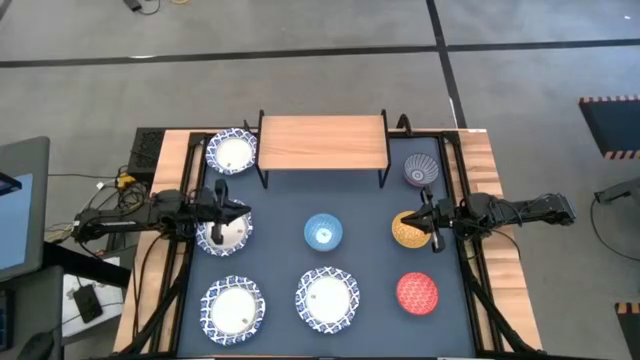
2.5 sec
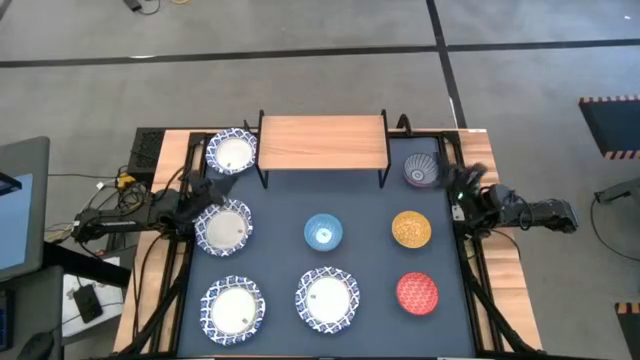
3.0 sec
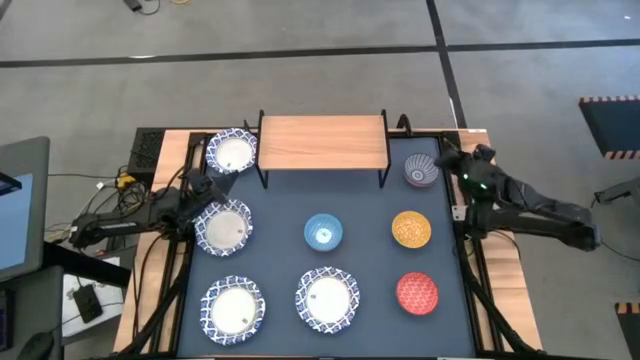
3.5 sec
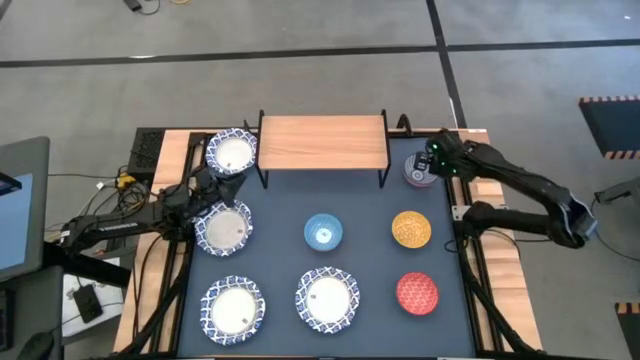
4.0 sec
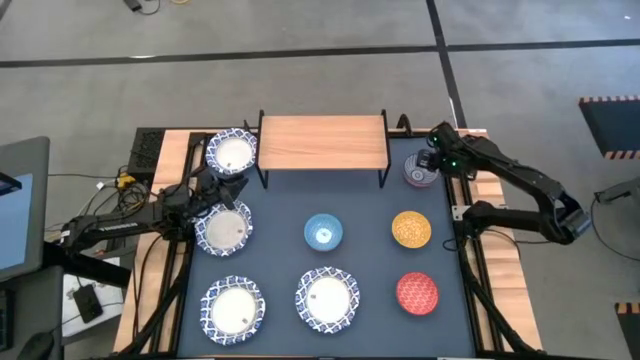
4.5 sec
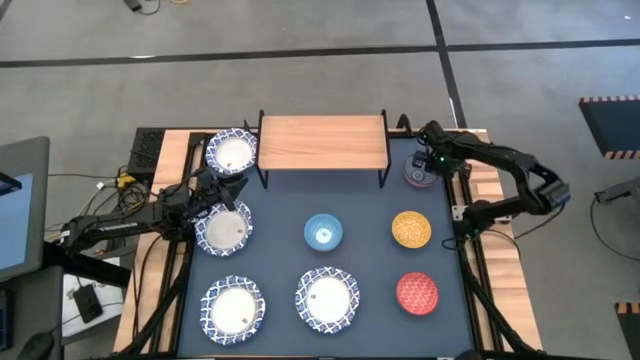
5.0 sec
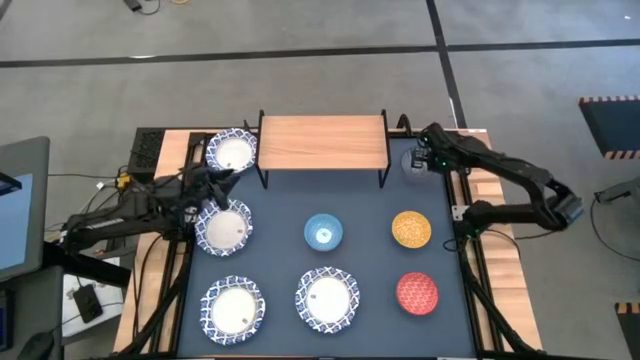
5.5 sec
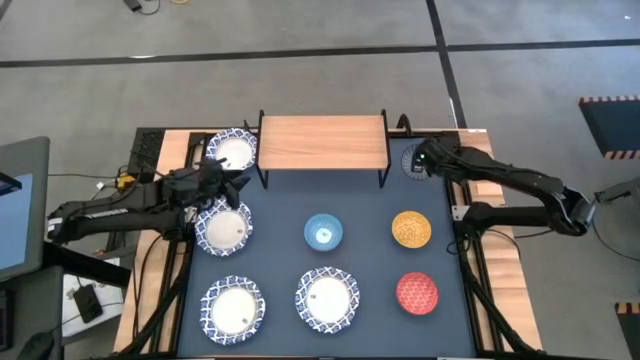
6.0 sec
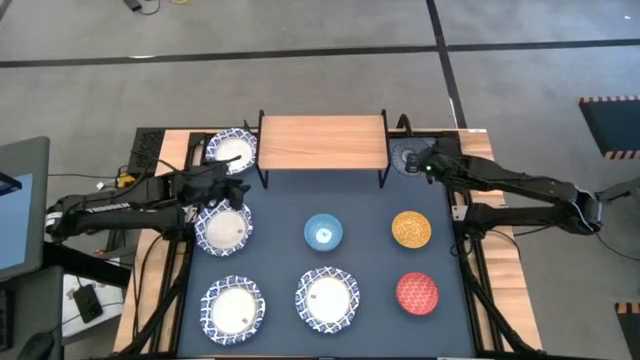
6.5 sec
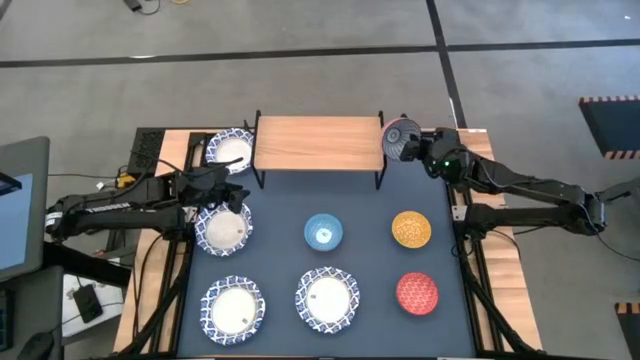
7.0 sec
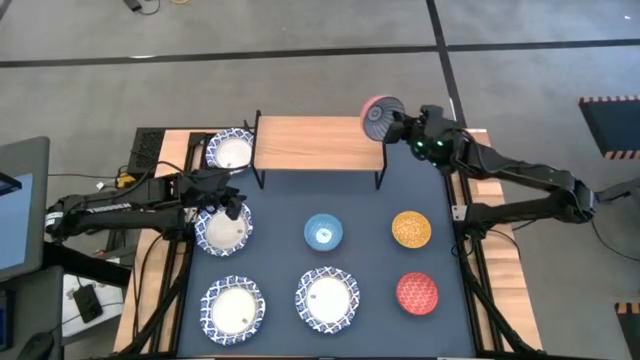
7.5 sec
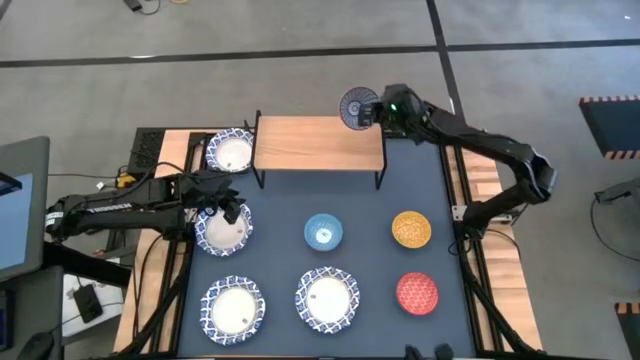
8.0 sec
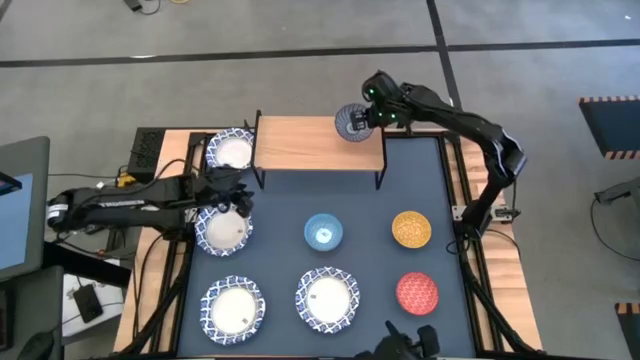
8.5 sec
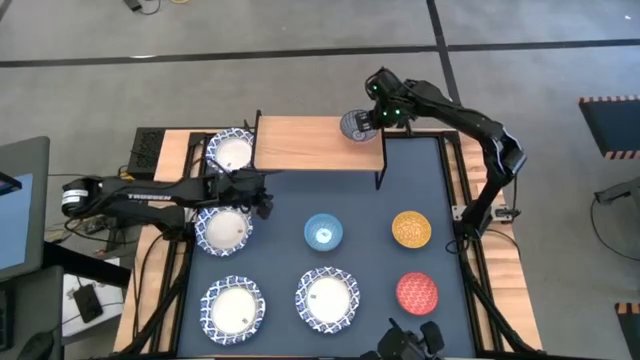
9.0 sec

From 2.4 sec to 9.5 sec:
Task: Place and stack bowls onto a shelf
Put the blue bowl on the shelf

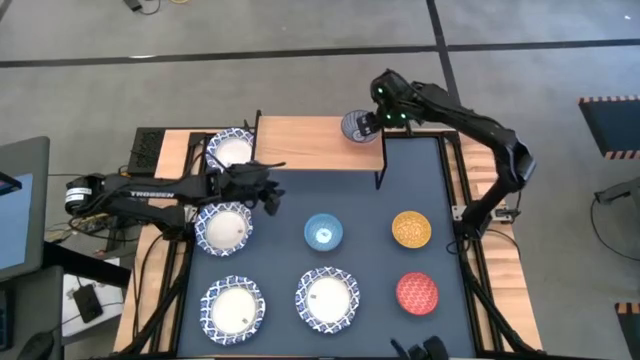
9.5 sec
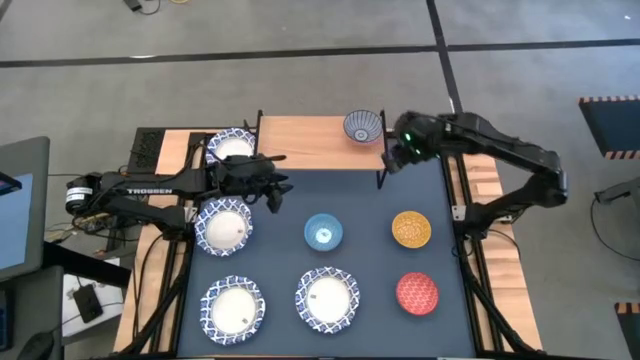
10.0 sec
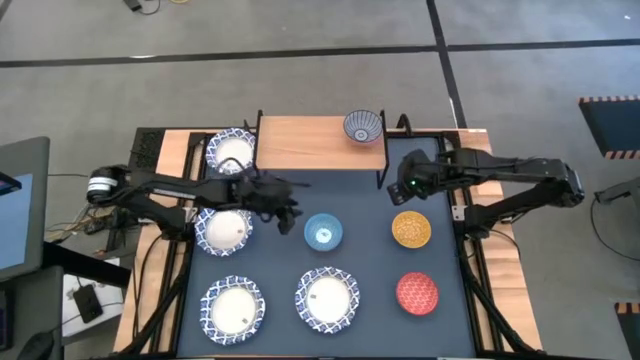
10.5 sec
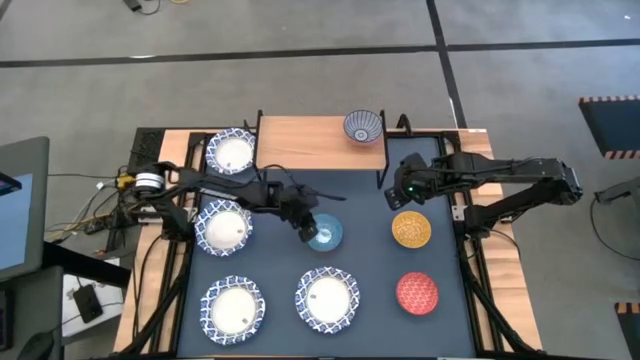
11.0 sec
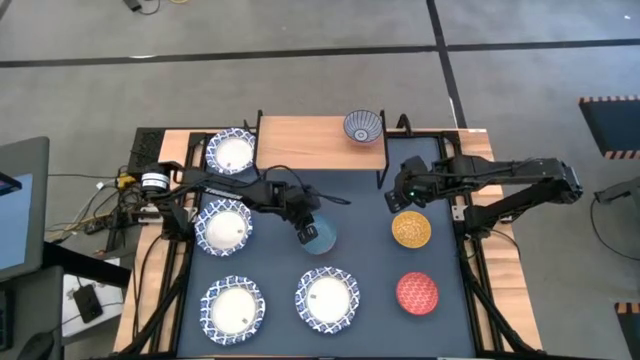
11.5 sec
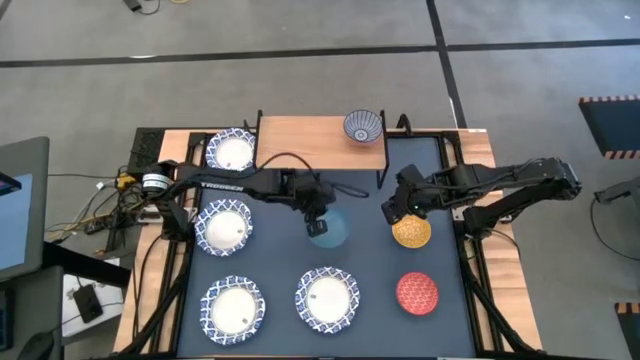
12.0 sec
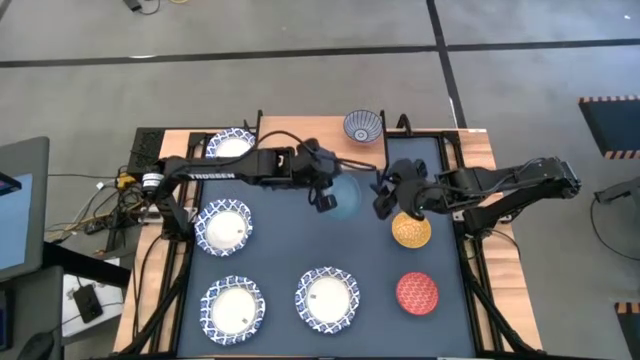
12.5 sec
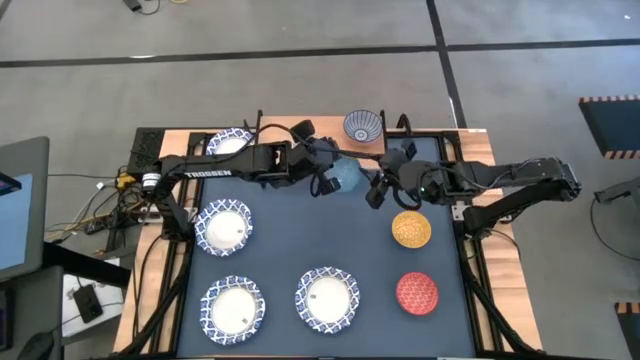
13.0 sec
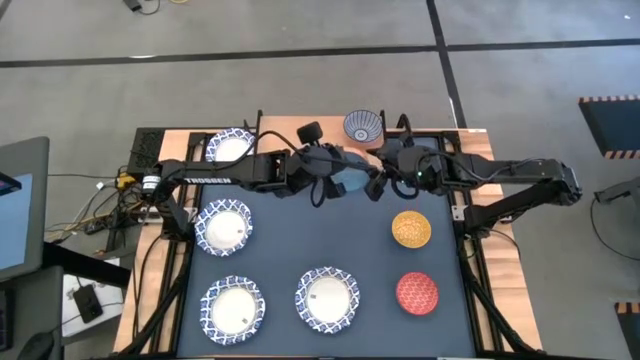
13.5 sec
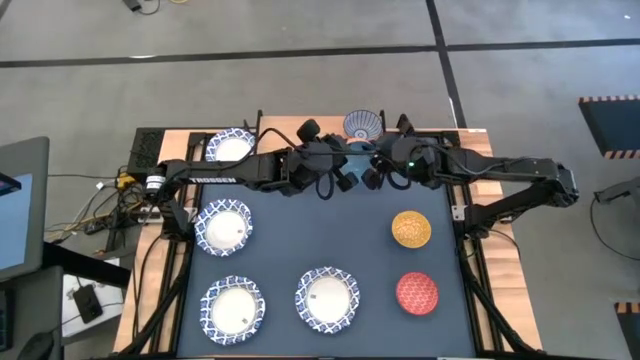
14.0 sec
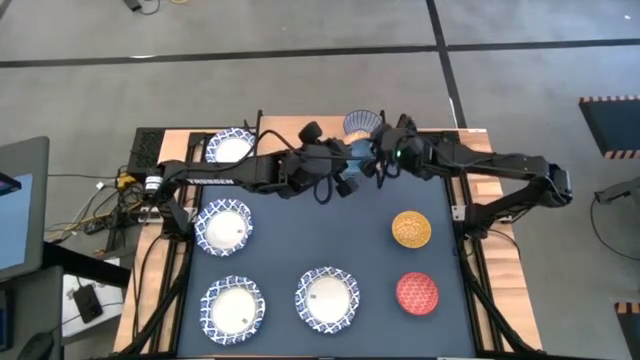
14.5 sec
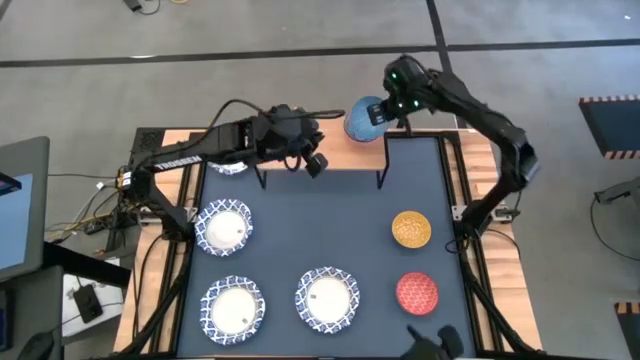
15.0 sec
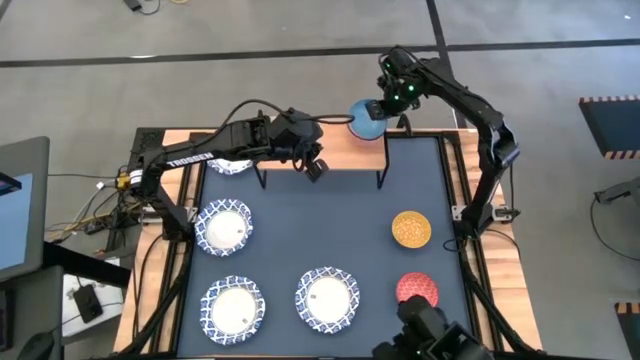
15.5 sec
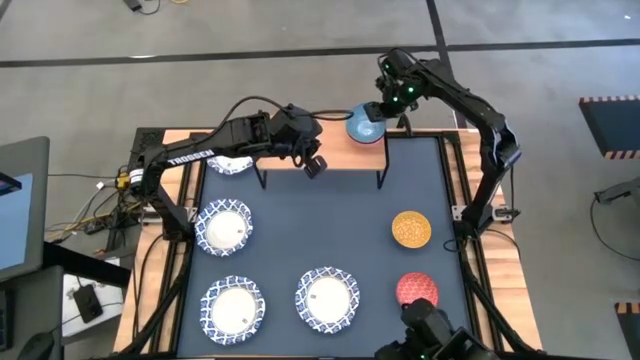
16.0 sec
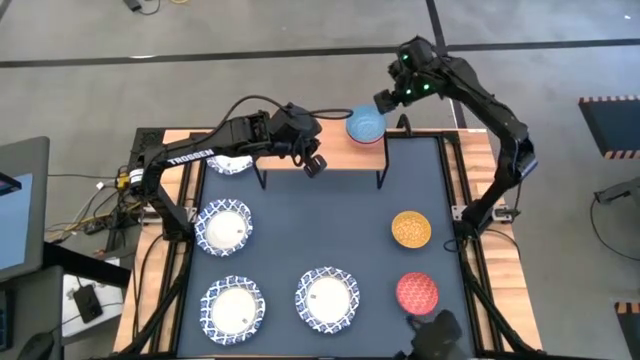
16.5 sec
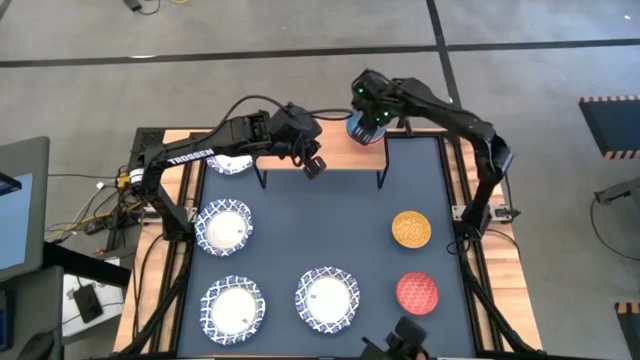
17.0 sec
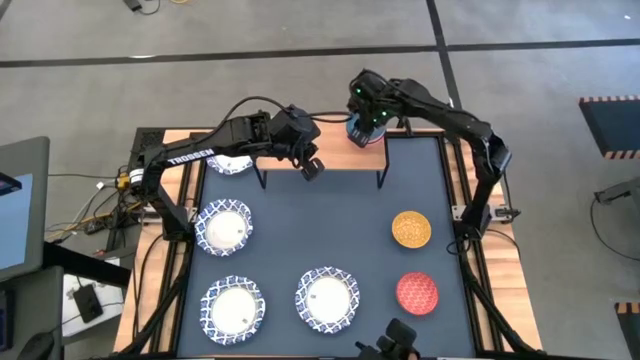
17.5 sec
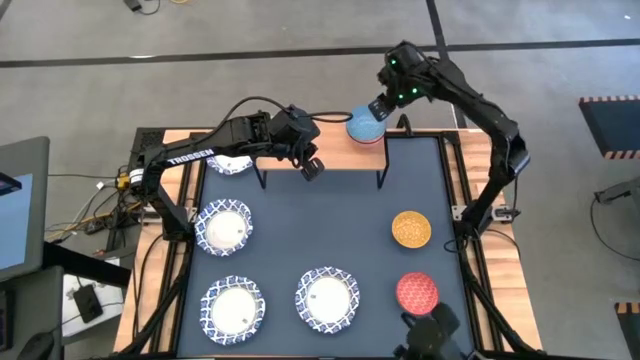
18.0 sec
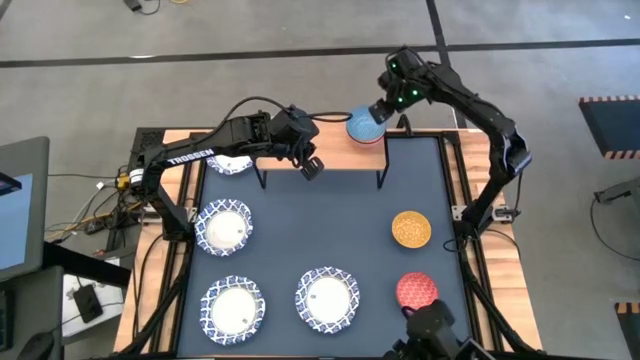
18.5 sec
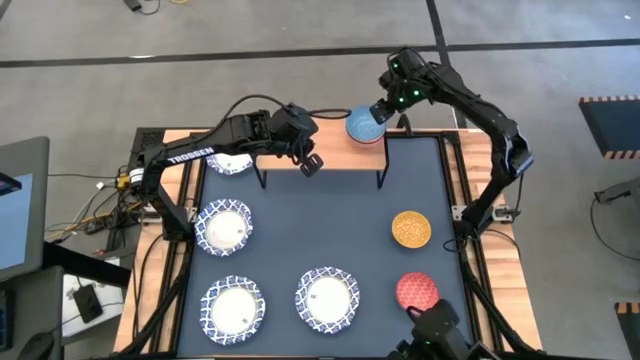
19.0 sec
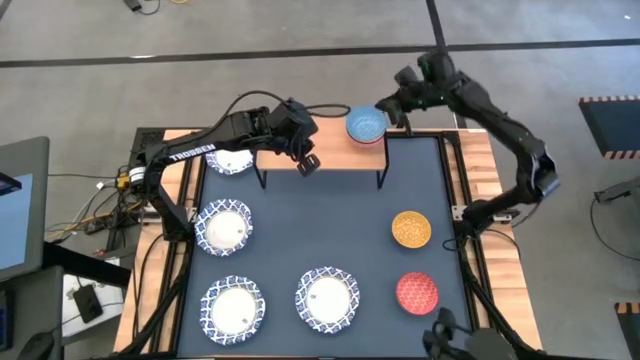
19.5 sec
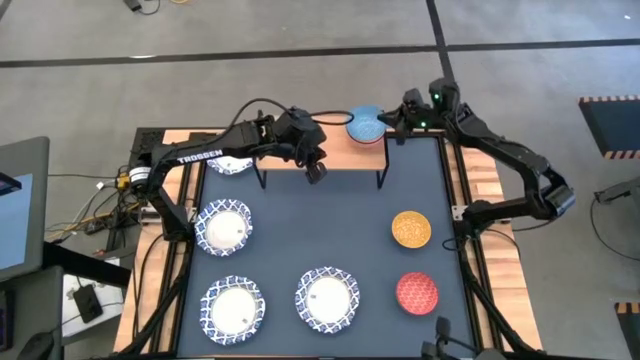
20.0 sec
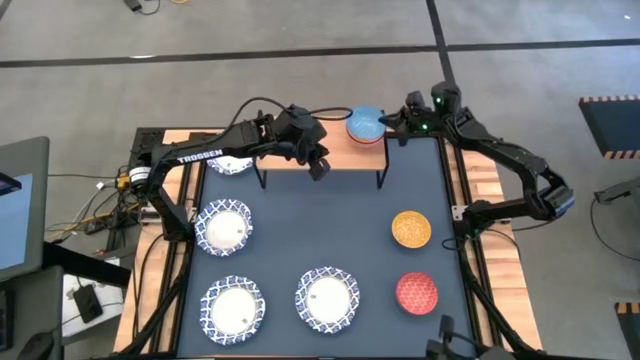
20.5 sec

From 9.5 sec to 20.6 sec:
Stack the light blue bowl on top of the blue bowl on the shelf

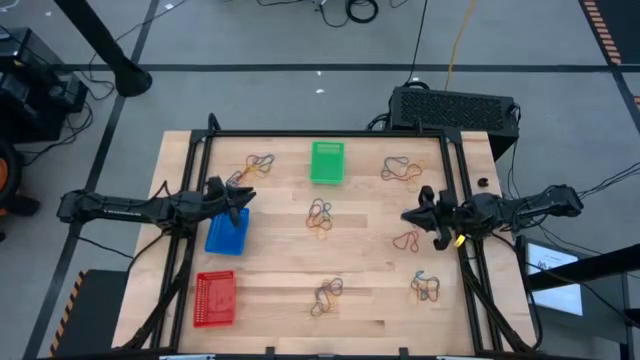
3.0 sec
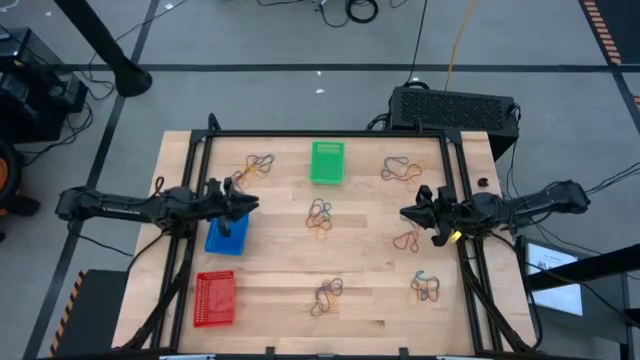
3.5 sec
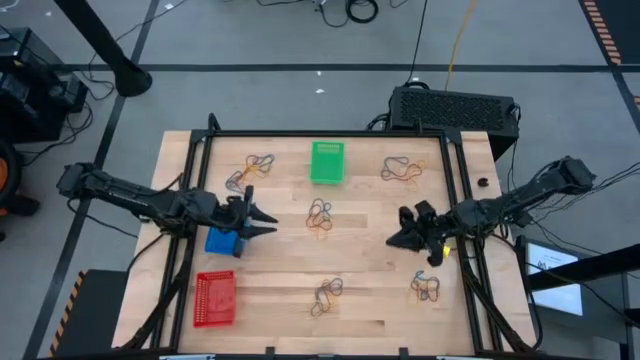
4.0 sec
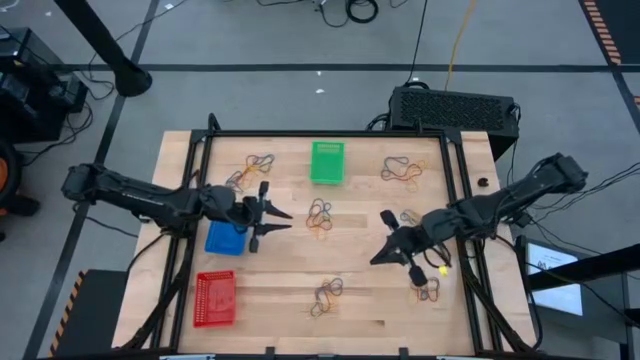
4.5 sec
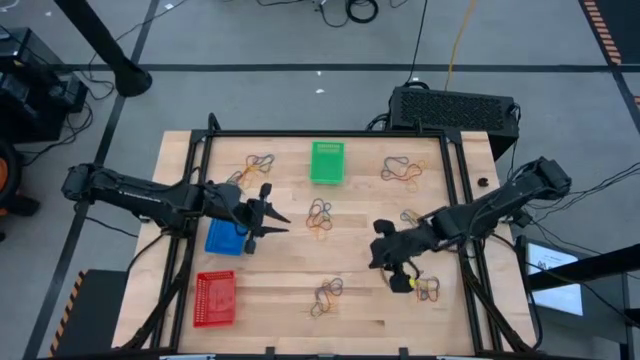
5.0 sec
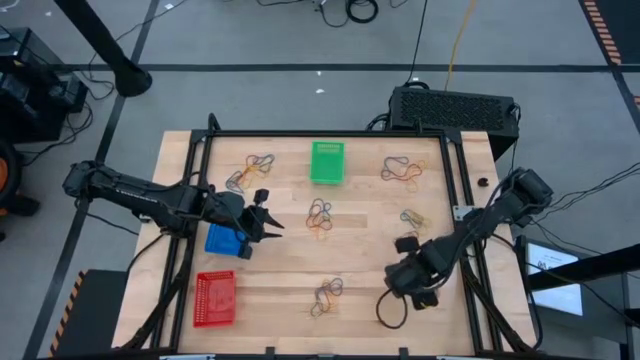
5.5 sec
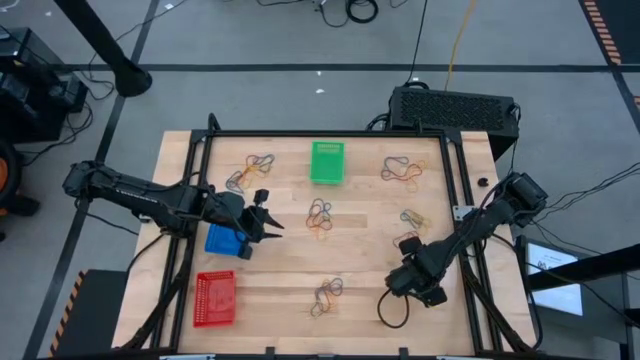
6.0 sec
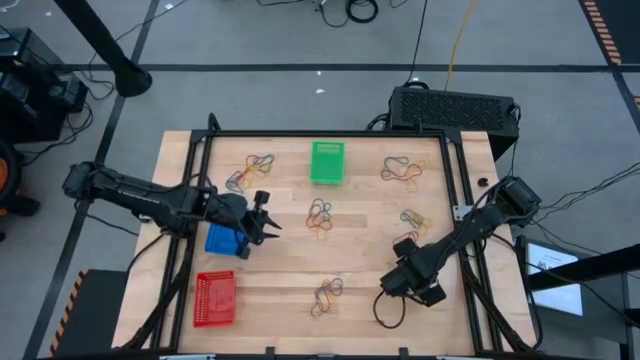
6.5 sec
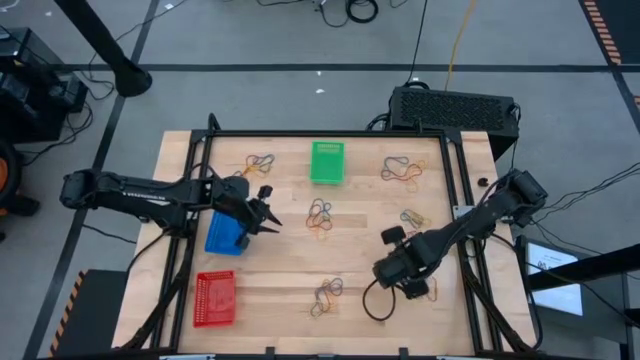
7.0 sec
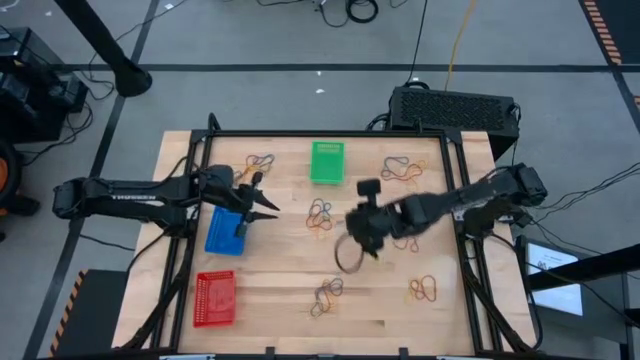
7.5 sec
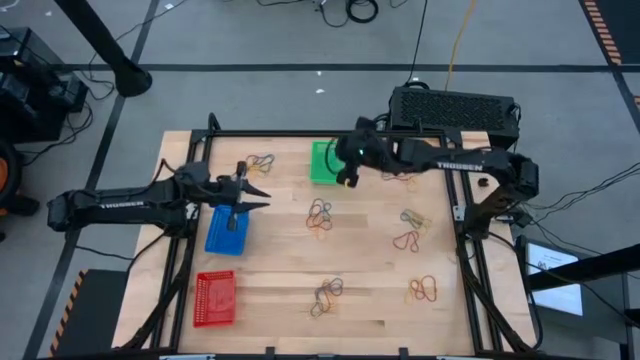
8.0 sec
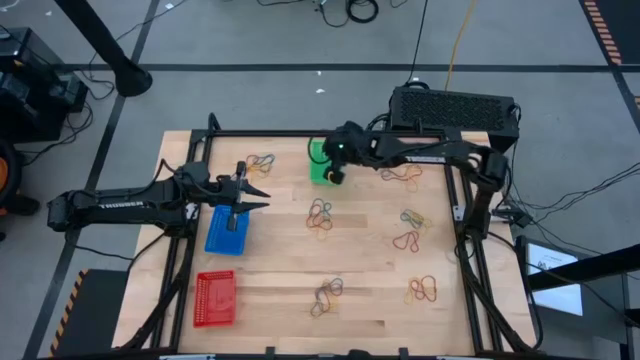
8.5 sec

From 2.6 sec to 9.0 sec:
Task: Sort rubber bands into baskets
Put the blue rubber band into the green bin
